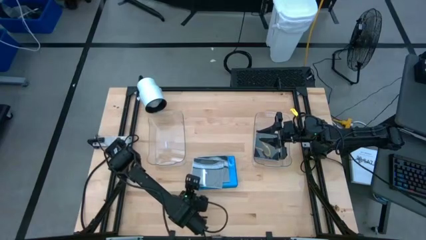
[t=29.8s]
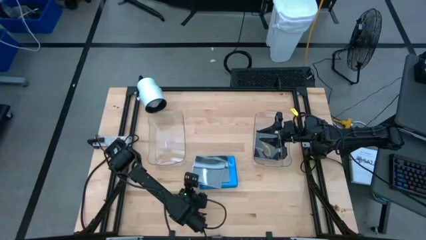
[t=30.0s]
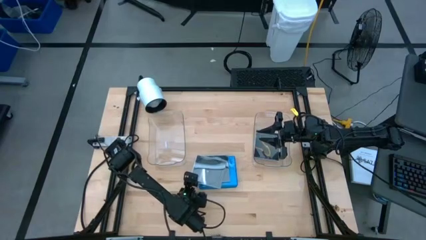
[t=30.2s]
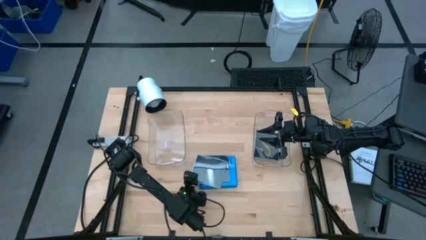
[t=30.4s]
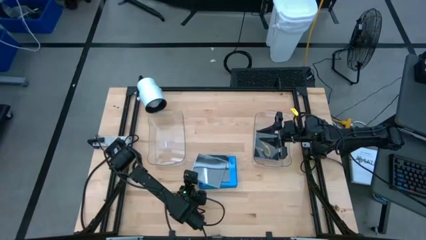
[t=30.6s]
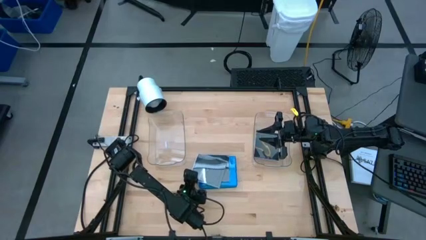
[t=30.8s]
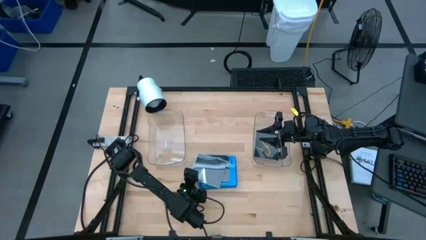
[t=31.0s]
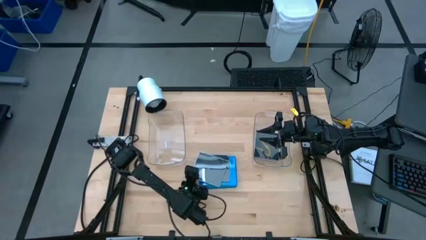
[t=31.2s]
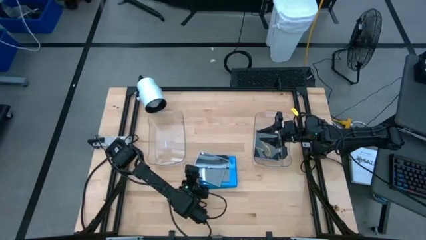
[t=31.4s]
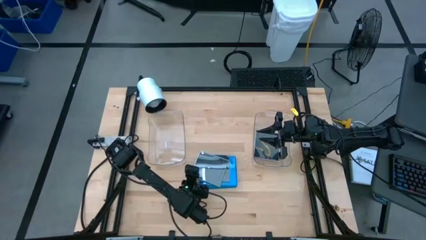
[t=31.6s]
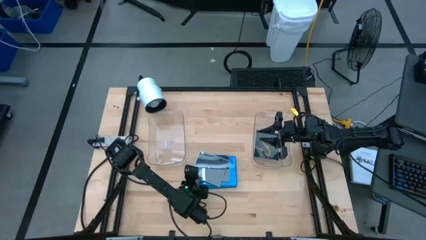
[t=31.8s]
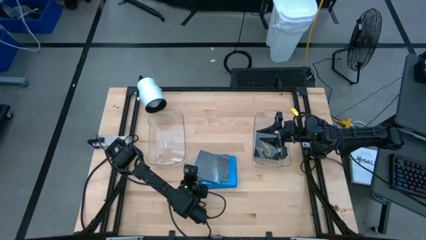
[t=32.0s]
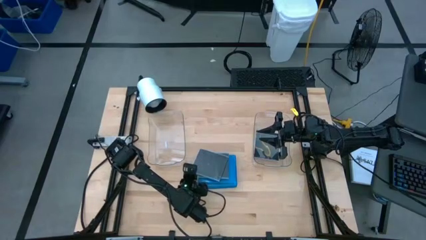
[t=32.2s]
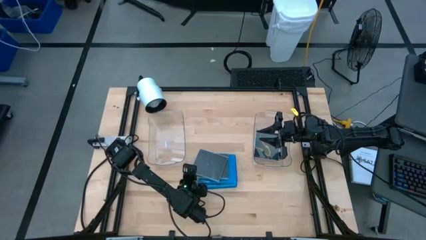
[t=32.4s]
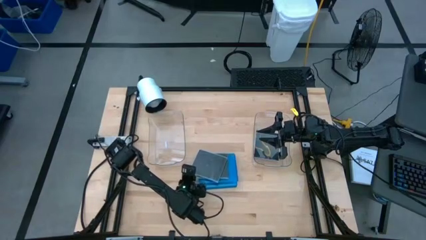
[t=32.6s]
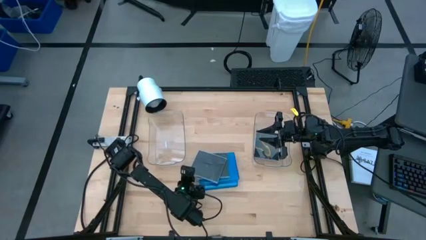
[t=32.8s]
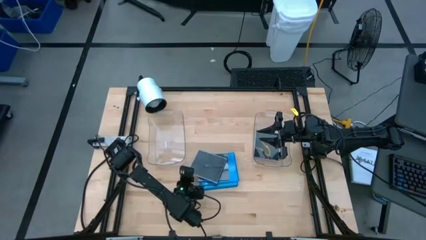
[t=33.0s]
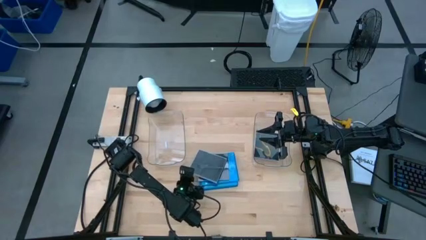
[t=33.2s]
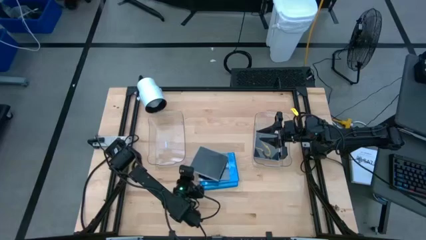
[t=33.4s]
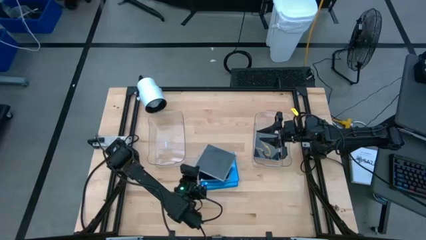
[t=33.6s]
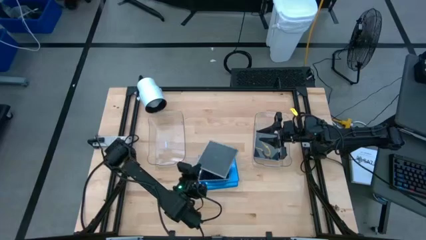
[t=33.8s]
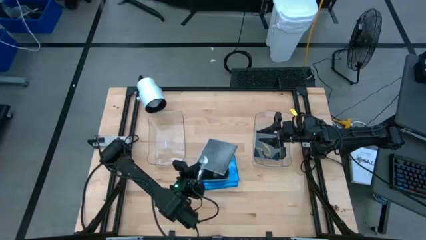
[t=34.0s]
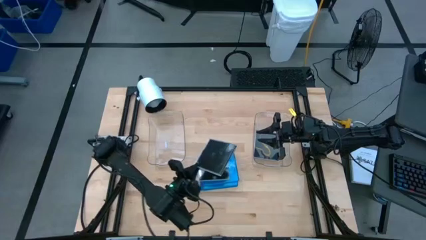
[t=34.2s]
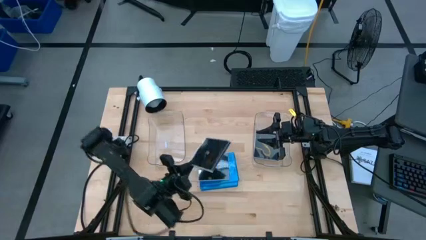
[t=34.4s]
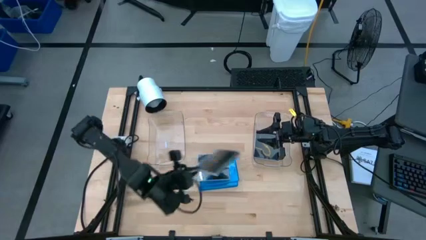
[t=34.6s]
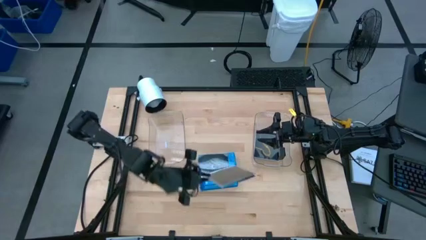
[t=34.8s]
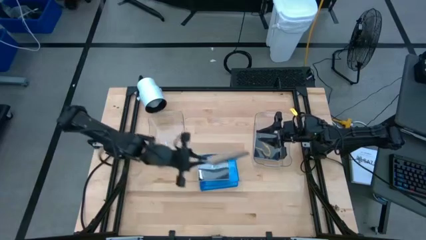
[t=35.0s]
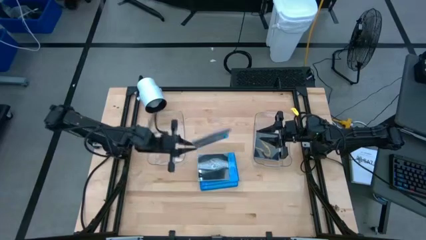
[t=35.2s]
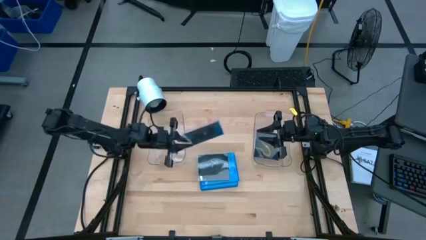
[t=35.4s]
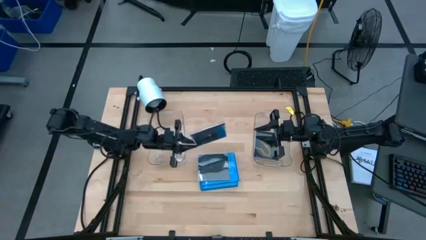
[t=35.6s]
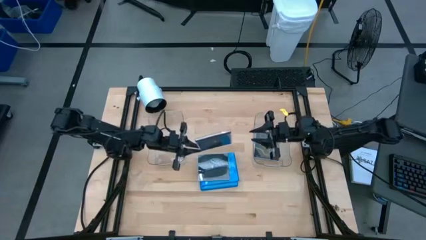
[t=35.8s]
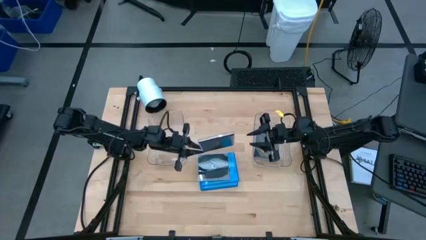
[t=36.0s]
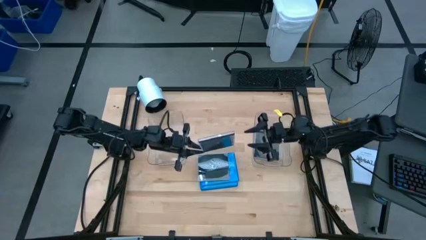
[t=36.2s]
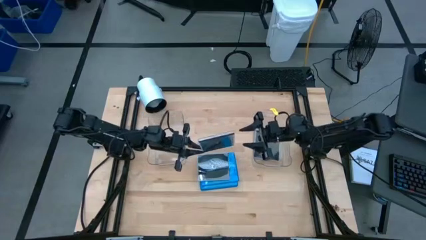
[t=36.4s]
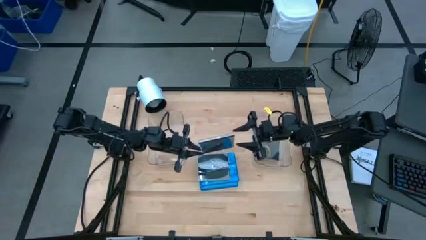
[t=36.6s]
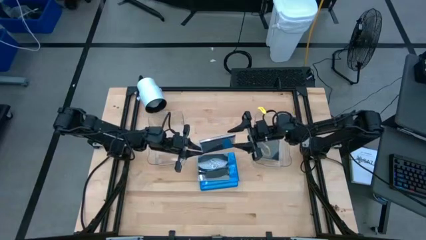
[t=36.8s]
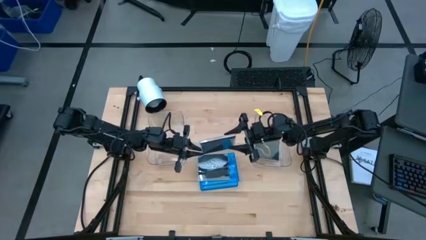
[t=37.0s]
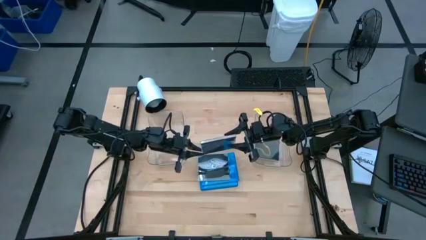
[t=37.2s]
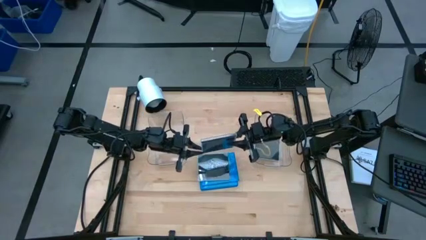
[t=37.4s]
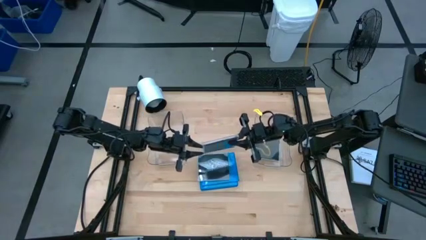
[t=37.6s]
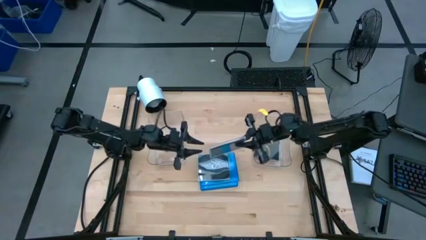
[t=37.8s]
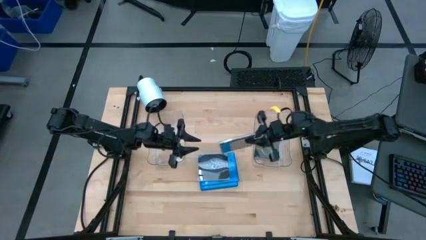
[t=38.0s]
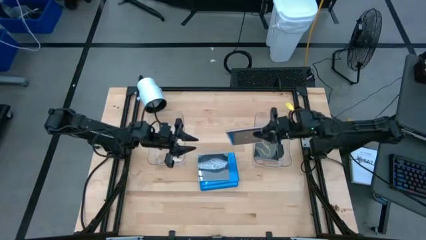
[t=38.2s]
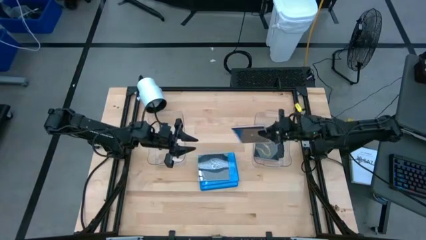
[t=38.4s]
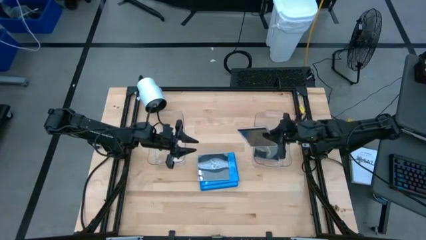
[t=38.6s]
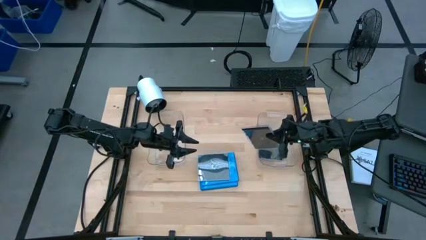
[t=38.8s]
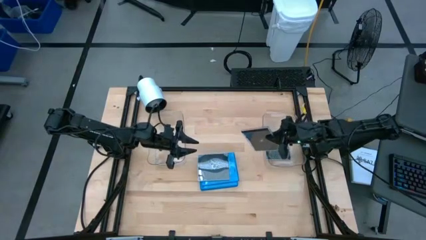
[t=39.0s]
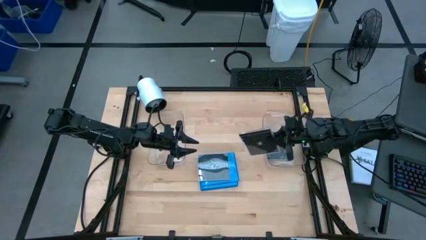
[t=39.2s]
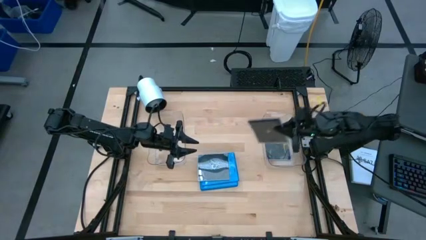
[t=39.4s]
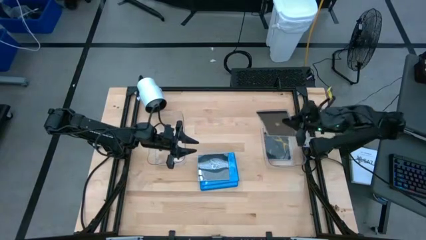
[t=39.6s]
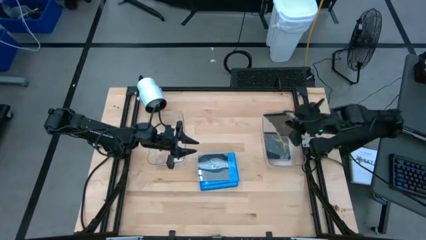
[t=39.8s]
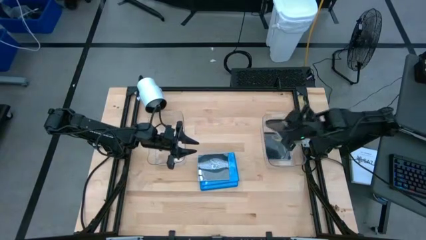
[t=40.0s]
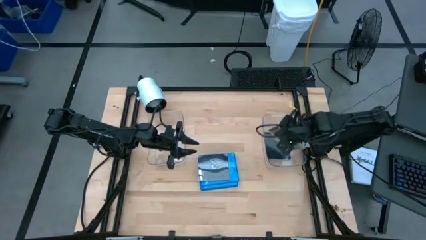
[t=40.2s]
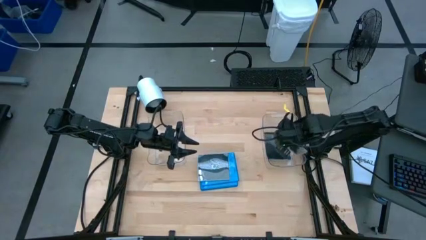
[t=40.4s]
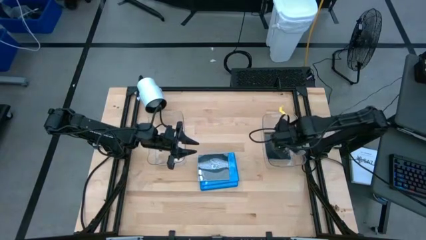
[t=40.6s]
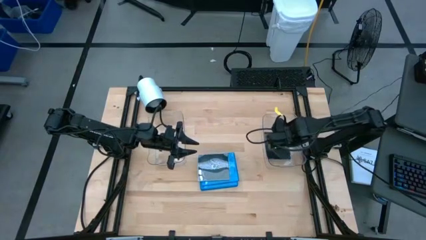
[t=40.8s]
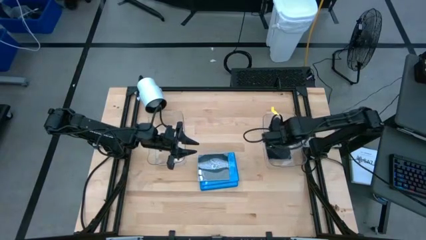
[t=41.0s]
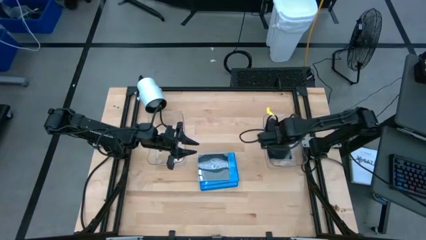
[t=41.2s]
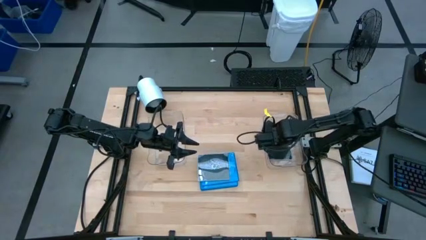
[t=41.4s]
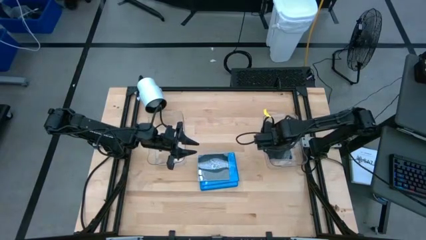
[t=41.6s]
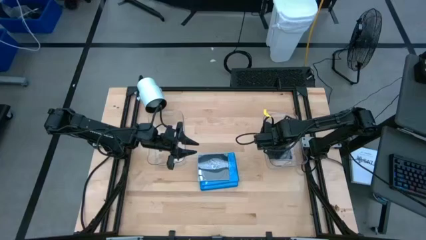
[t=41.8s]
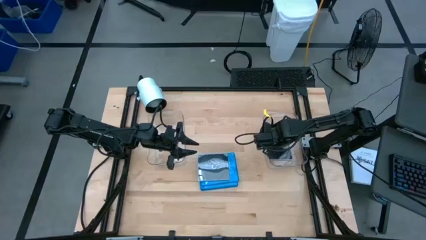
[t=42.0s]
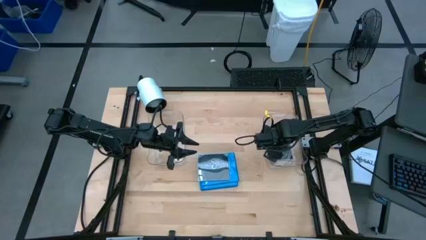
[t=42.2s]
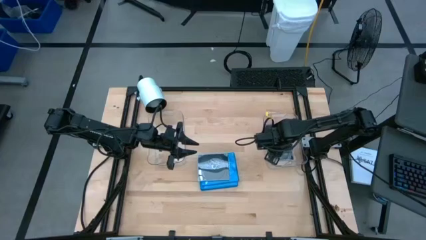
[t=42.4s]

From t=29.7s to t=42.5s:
Task: Pick & place jewel cases by type
Put the black CD case into the right transparent bin
